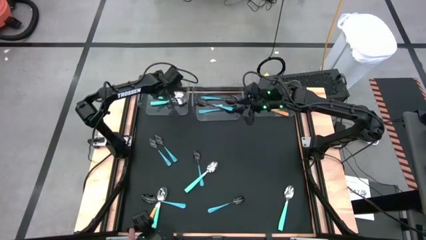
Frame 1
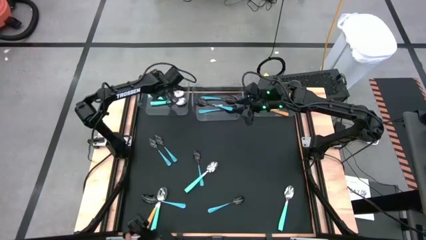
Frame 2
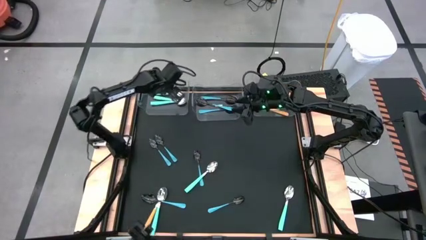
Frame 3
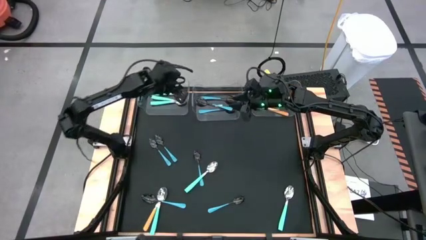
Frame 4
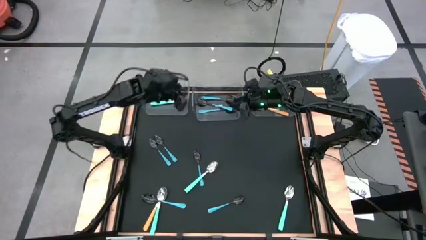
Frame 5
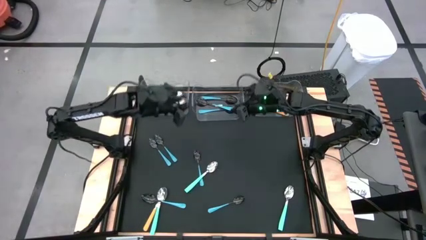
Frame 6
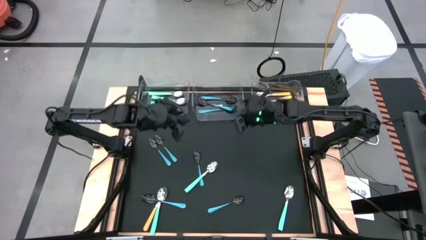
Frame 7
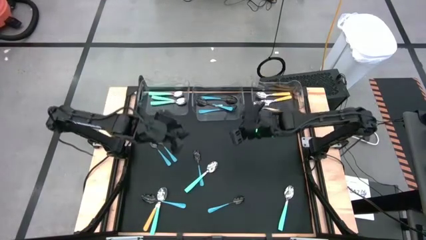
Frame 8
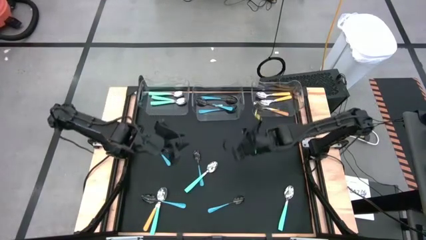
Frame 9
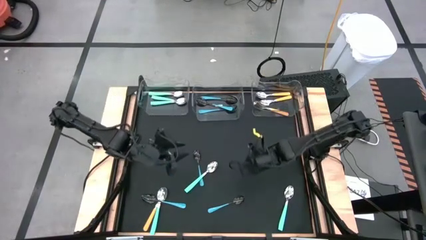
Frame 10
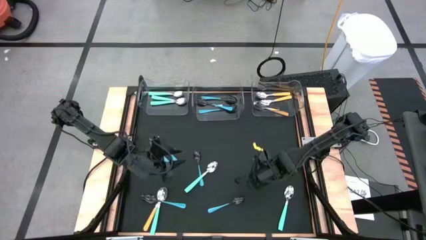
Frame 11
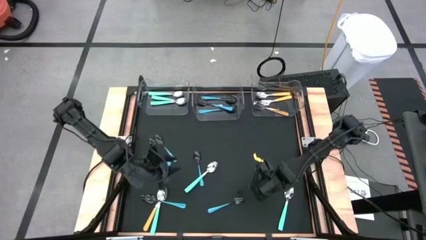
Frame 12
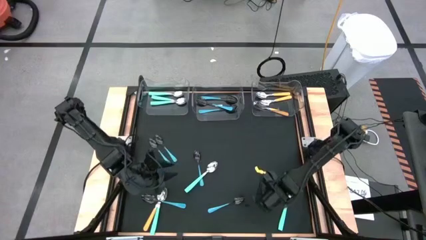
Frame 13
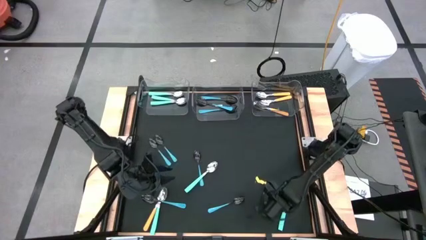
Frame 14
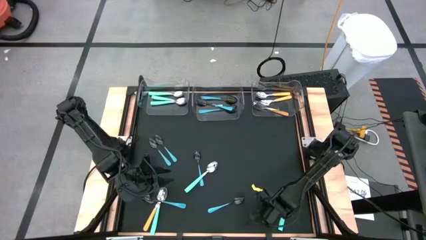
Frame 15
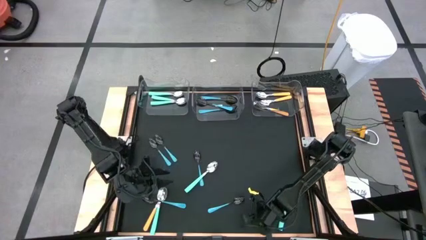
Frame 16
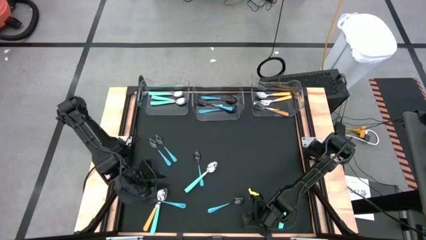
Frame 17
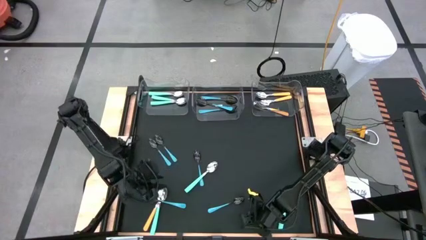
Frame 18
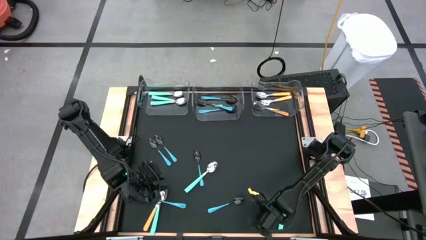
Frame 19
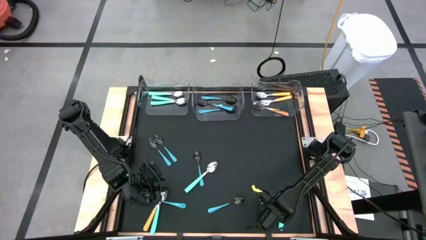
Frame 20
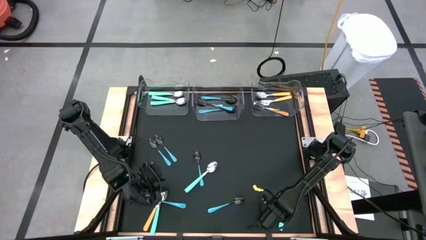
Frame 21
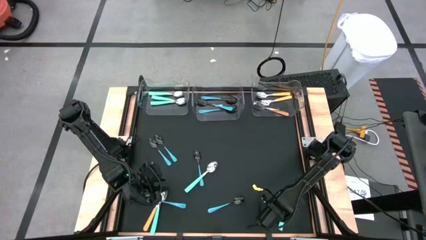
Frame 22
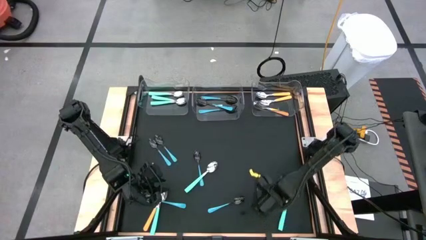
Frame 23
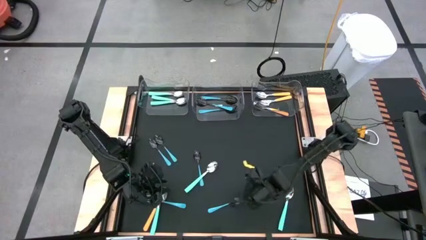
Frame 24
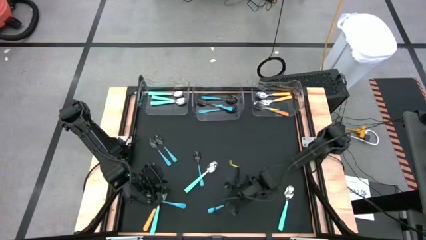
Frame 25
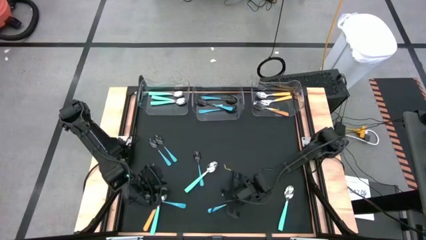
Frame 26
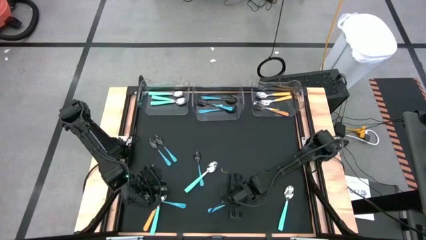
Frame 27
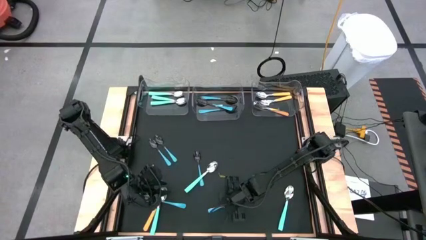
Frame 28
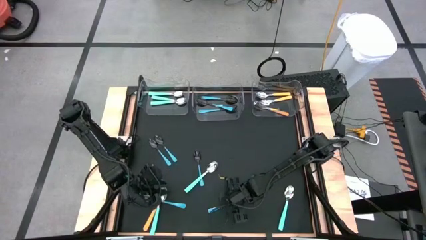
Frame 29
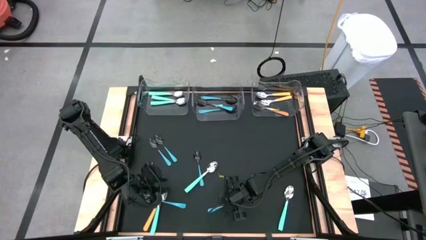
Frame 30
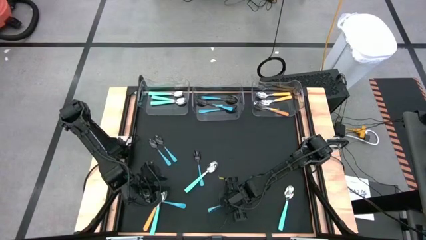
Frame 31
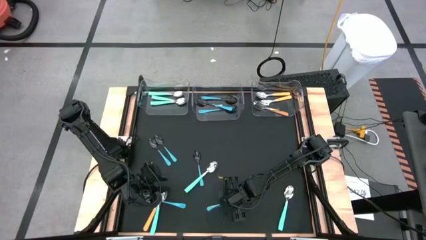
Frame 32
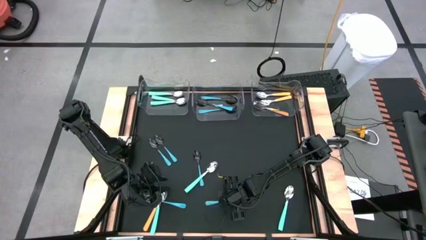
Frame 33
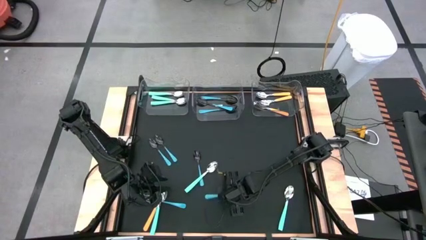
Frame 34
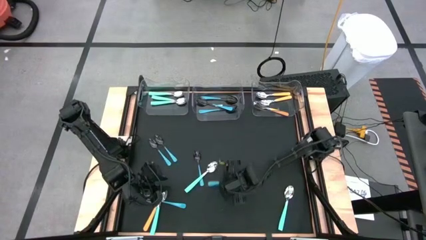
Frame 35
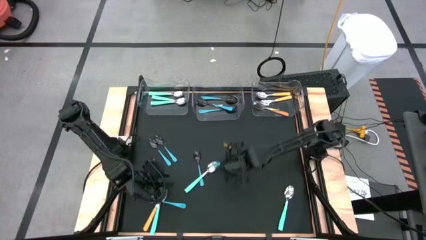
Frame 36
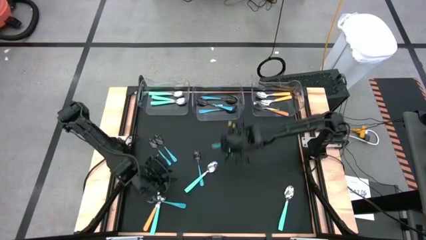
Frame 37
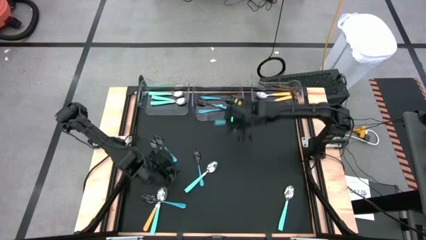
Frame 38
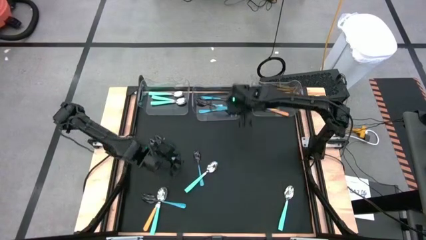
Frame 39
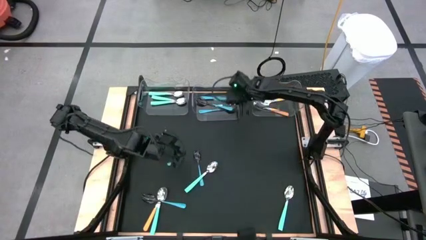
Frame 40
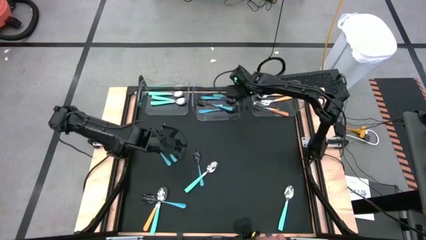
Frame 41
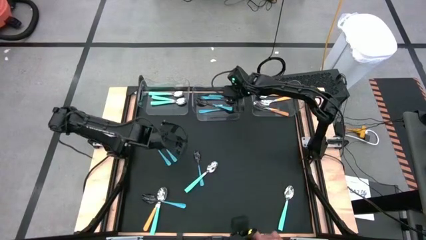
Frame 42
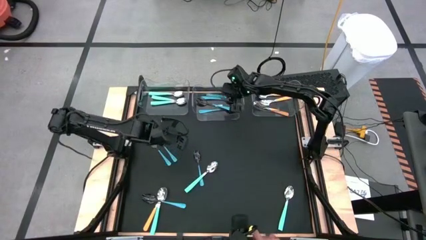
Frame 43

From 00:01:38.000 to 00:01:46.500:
Task: Sort silverware by color (type)
Put the blue spoon into the middle transparent bin

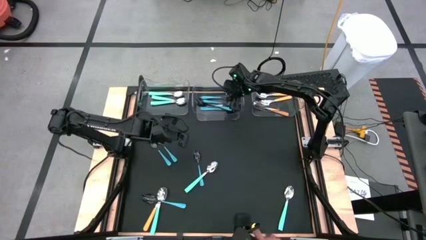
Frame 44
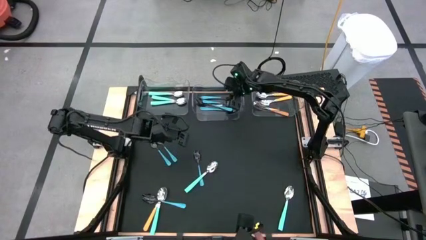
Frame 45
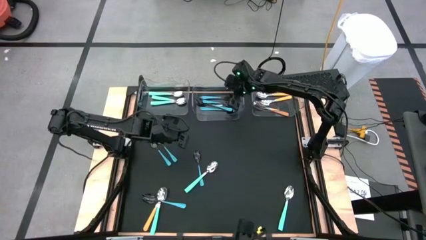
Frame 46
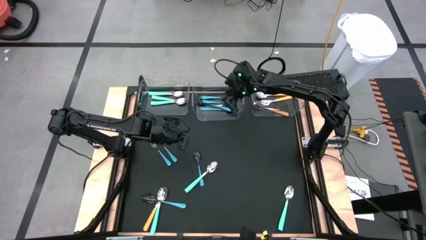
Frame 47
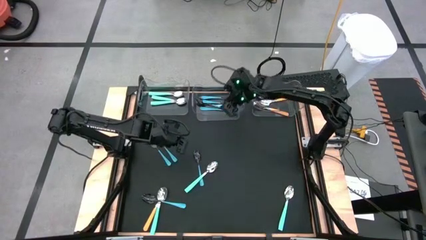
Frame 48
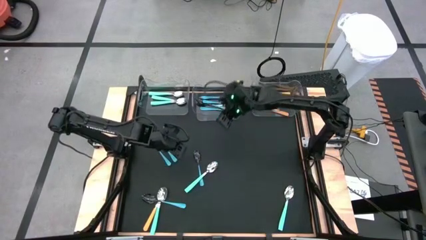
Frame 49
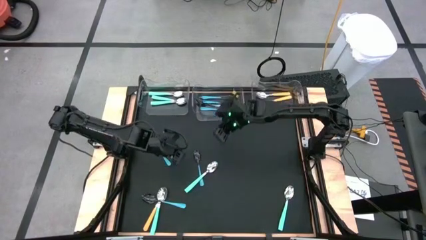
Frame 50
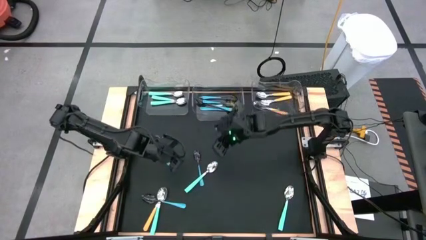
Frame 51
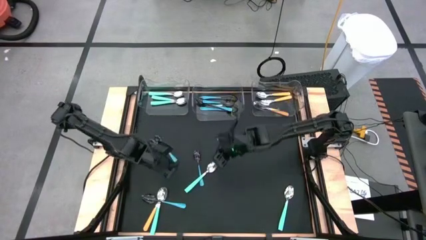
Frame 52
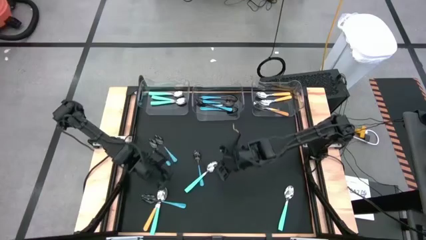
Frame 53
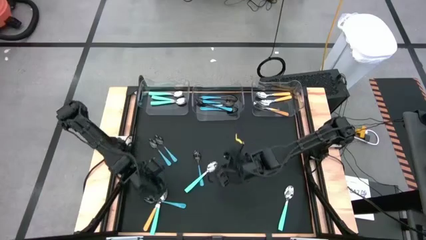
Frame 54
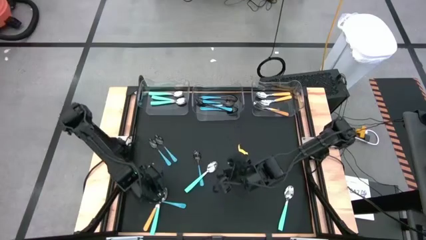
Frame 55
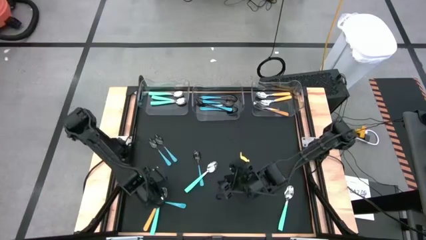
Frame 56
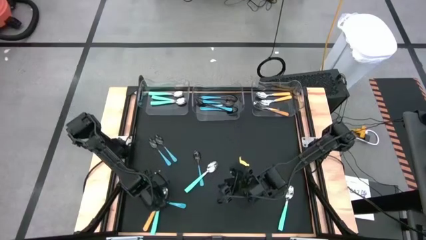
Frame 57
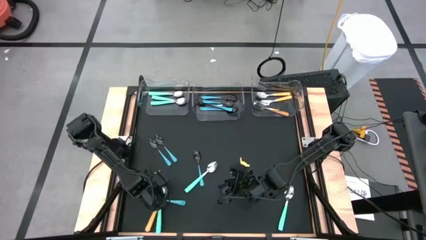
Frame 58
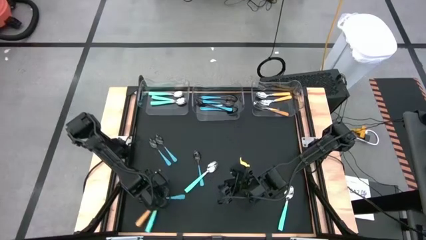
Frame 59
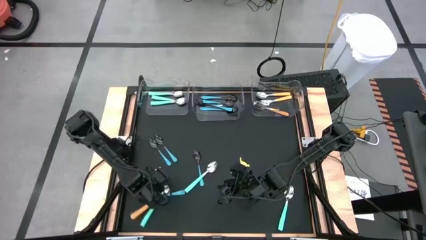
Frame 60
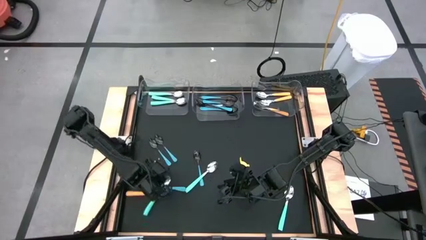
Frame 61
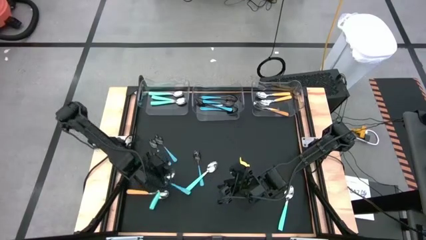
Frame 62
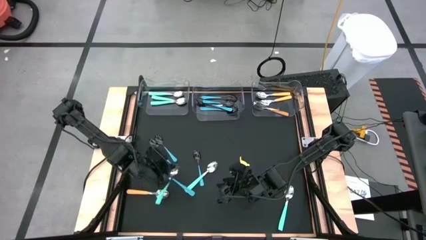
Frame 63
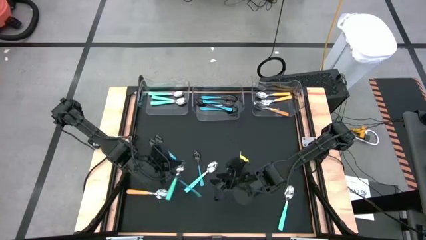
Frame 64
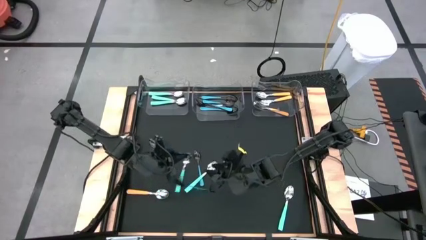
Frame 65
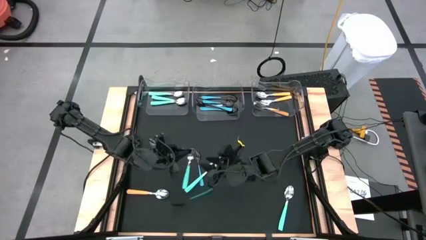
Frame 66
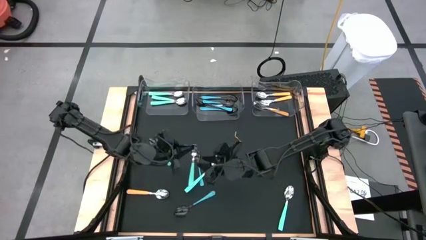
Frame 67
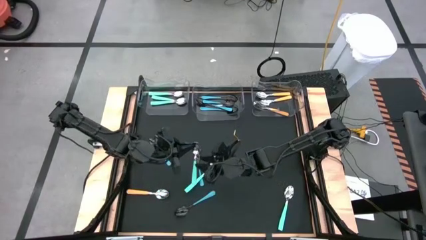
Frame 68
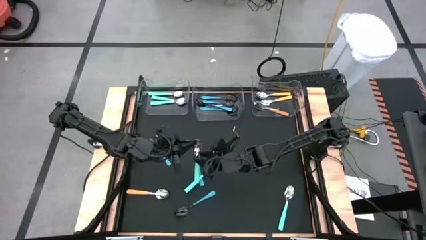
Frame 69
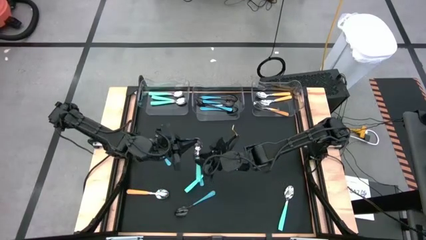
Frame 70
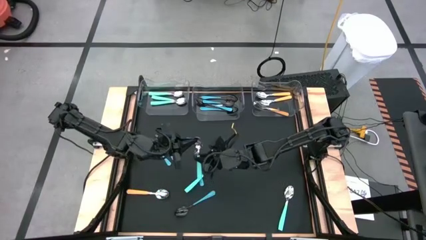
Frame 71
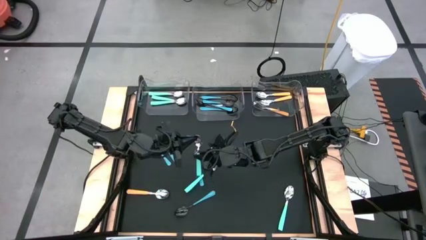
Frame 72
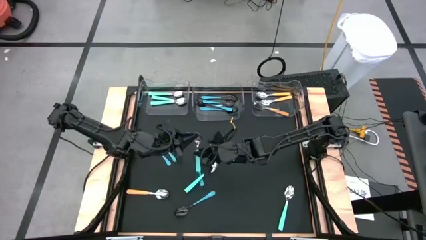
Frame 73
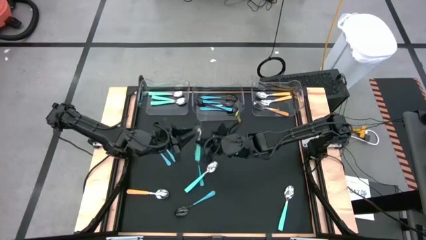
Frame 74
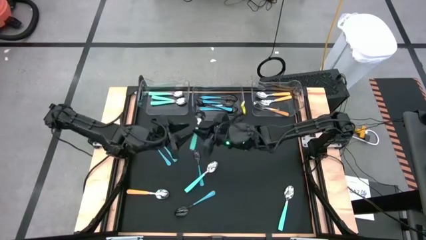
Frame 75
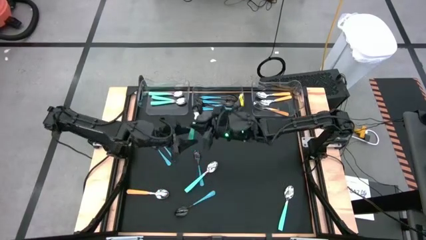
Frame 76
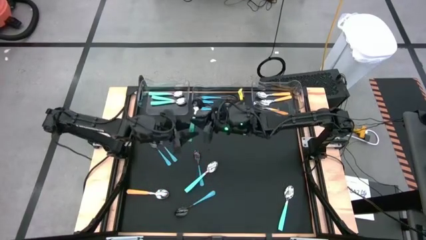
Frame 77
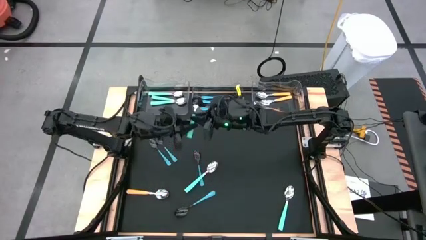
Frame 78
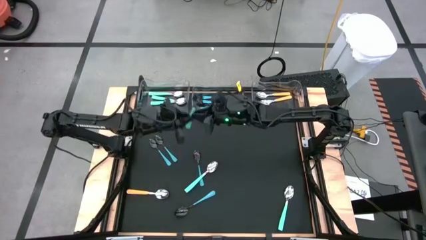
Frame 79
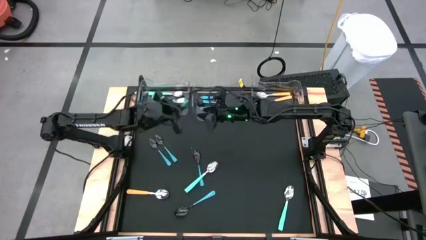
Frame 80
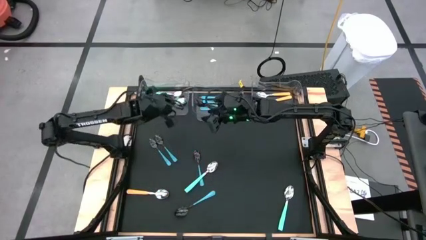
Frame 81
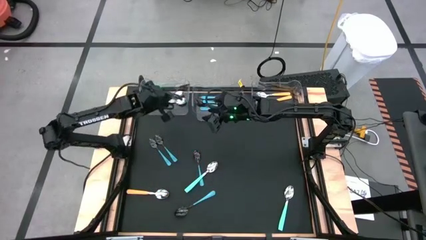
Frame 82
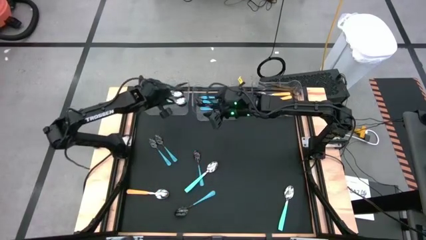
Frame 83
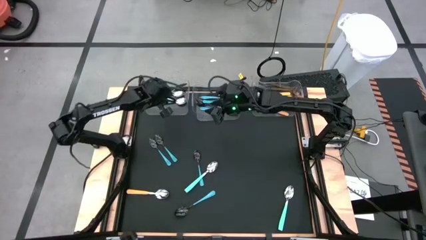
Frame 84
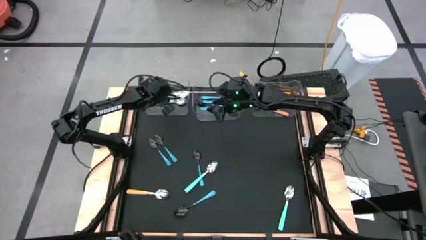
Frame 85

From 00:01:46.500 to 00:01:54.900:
Put the light blue spoon into the left transparent bin
